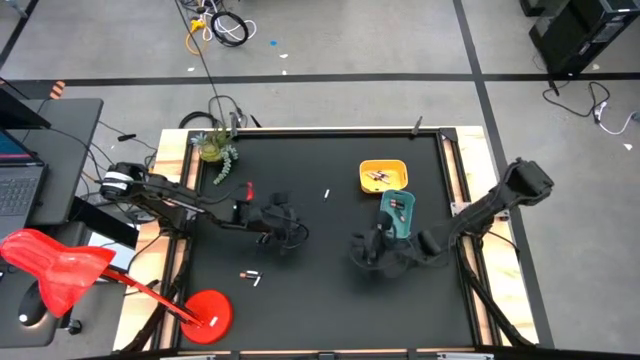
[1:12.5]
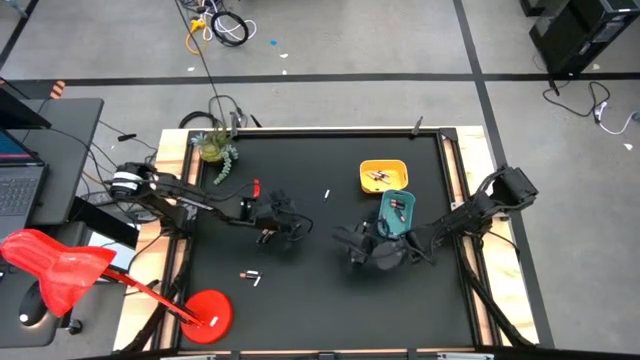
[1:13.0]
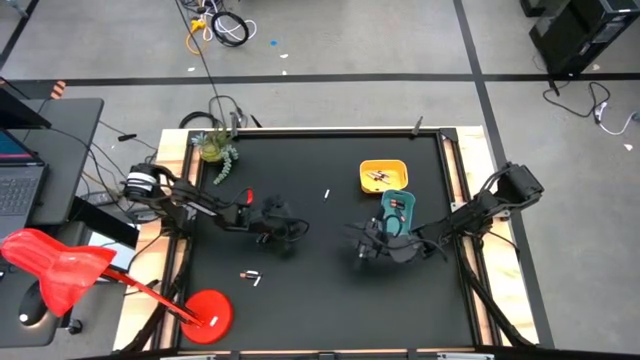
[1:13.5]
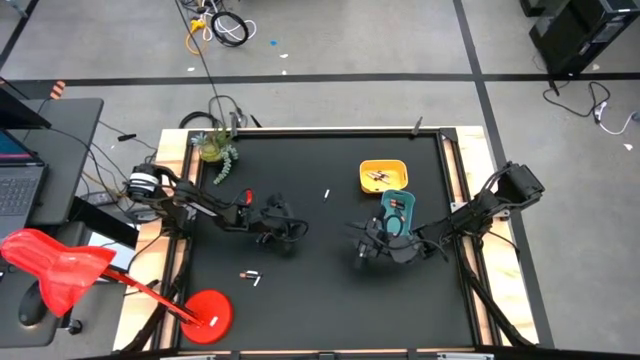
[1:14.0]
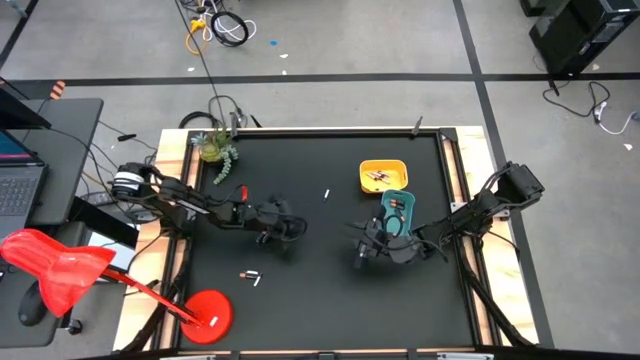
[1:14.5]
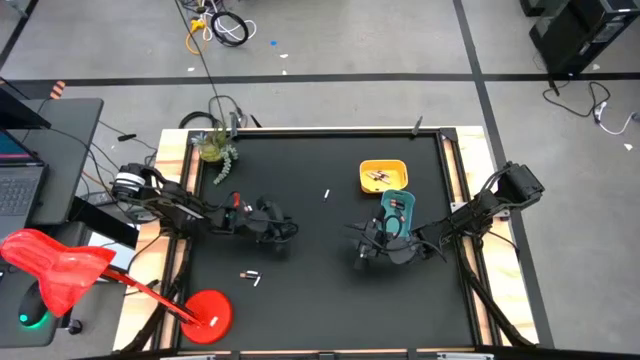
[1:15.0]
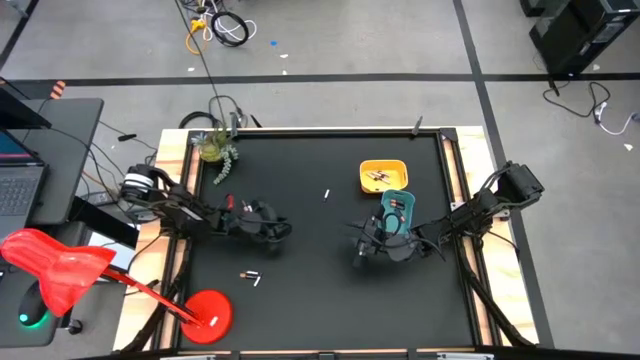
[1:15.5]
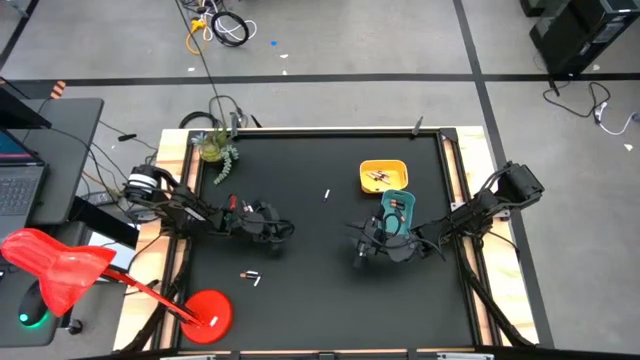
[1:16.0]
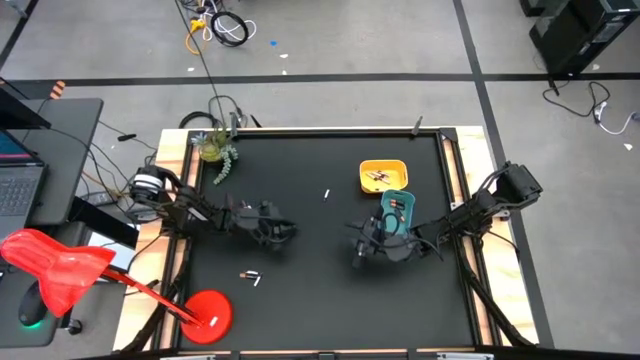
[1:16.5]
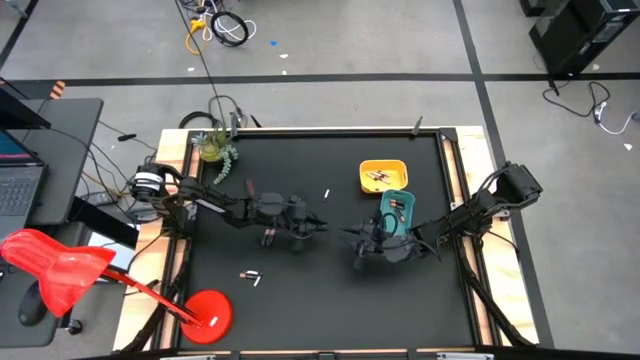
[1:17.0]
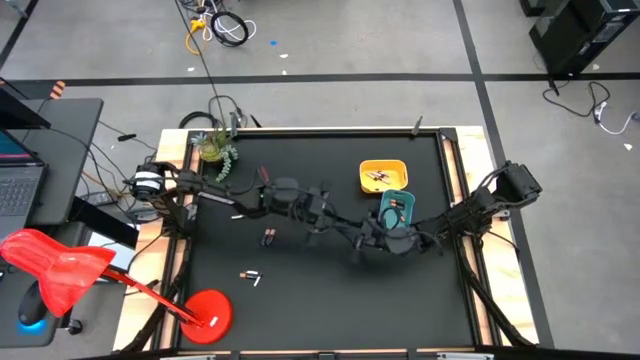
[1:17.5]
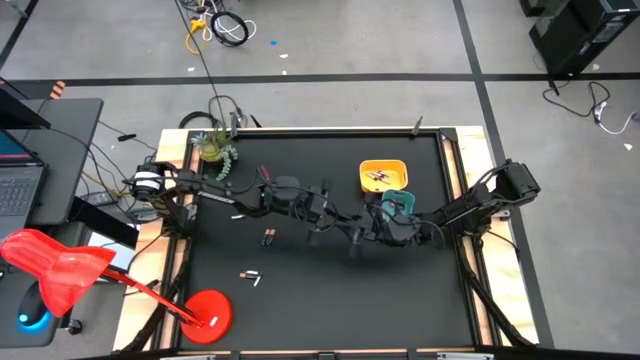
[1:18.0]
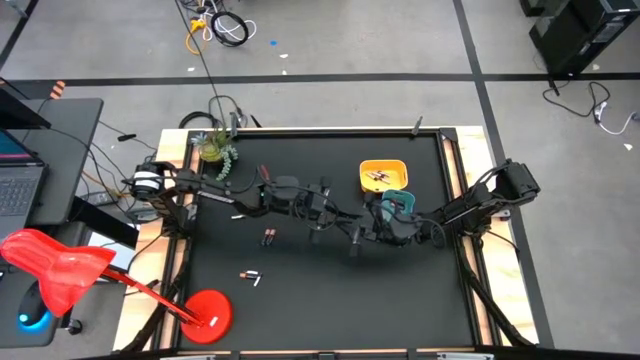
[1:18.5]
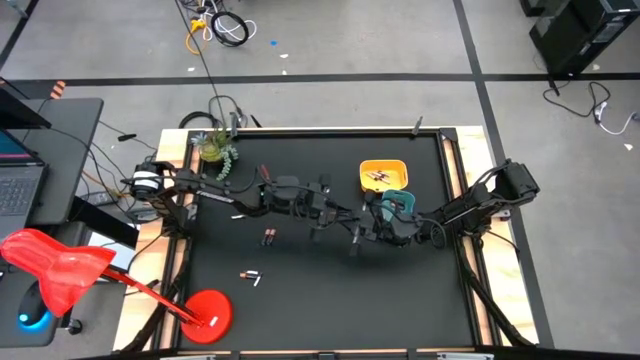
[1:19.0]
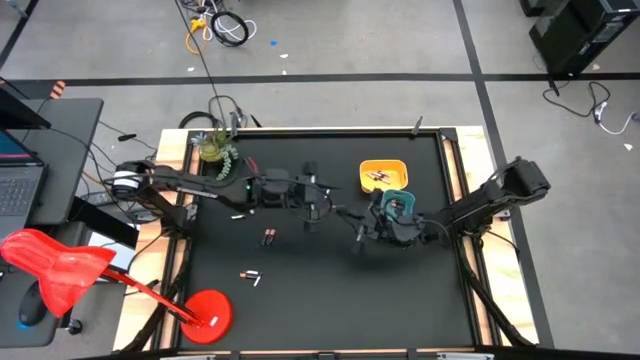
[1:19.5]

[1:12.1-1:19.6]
Task: Sort batteries
Put the gold black battery into the blue bin

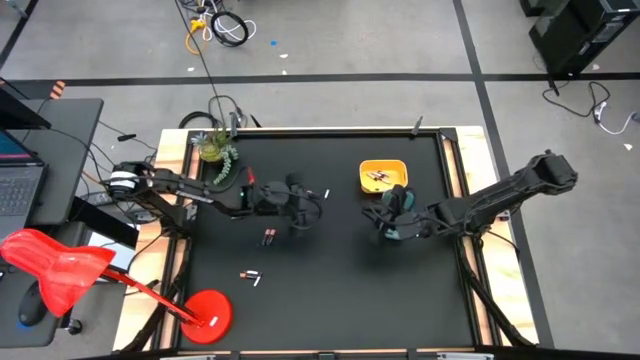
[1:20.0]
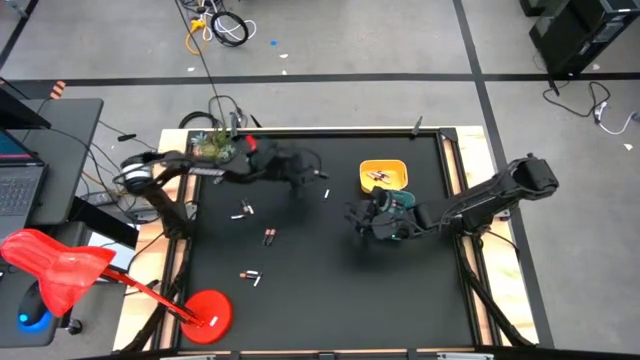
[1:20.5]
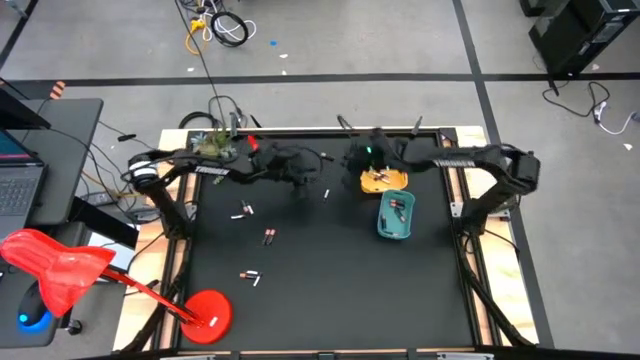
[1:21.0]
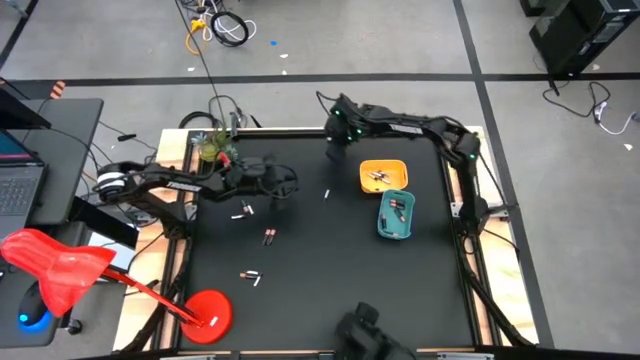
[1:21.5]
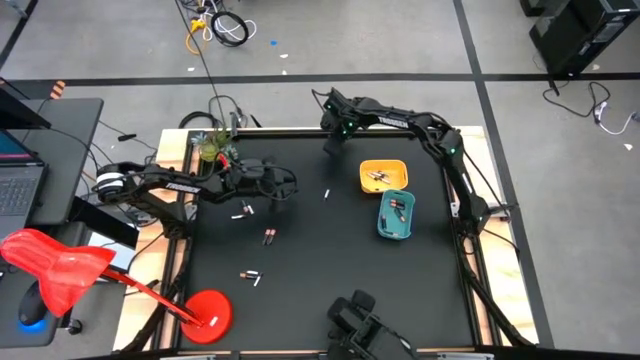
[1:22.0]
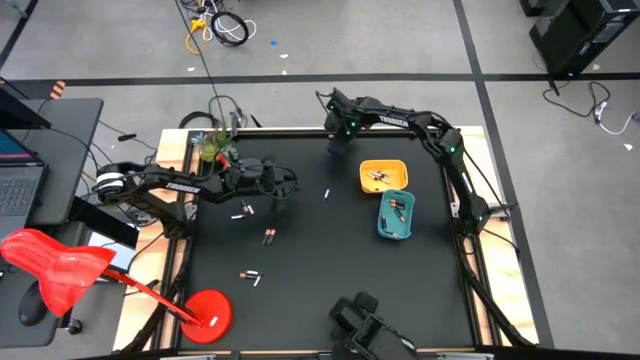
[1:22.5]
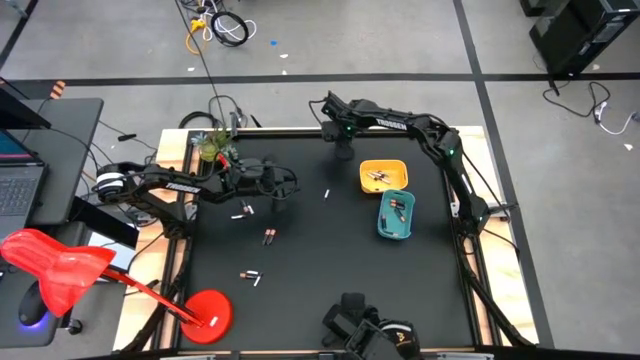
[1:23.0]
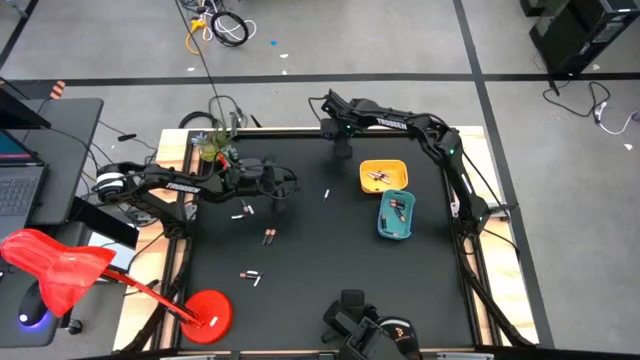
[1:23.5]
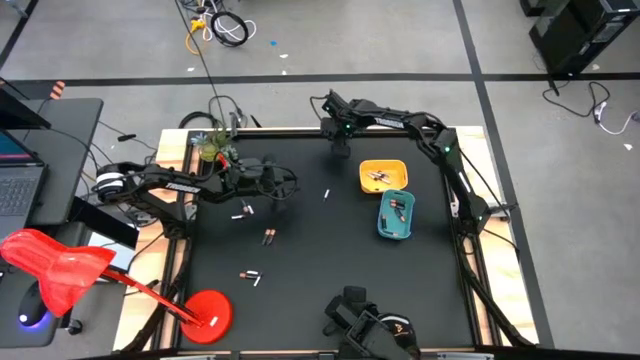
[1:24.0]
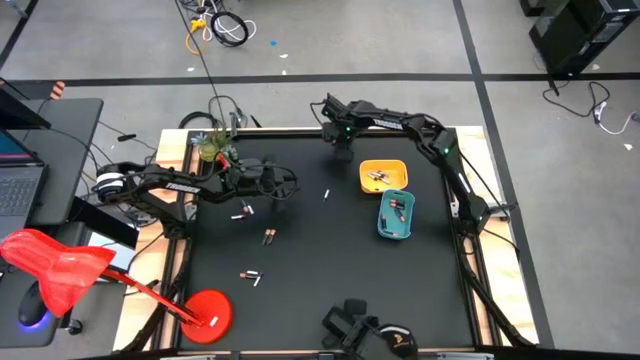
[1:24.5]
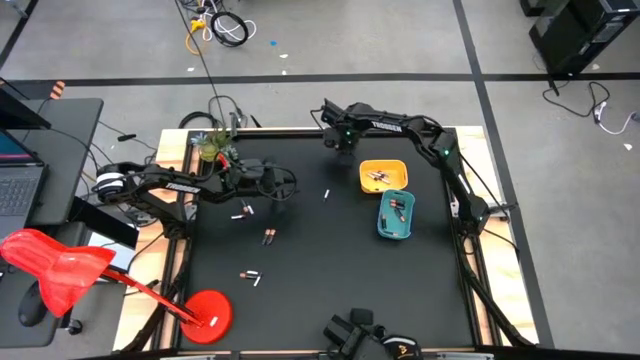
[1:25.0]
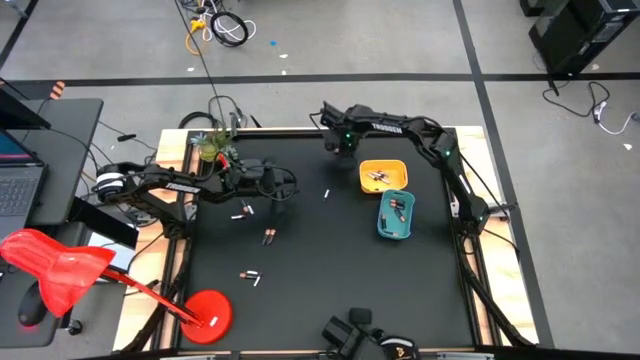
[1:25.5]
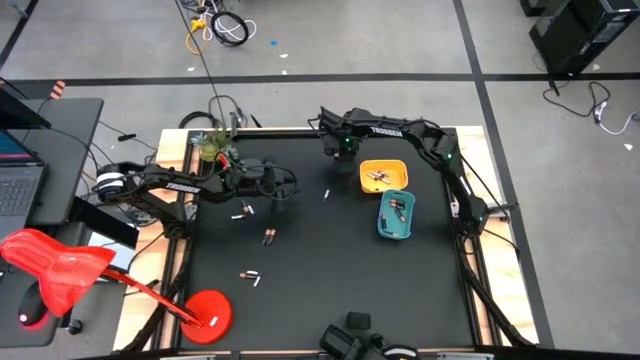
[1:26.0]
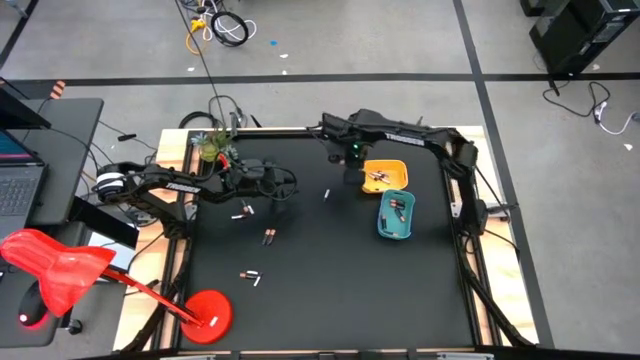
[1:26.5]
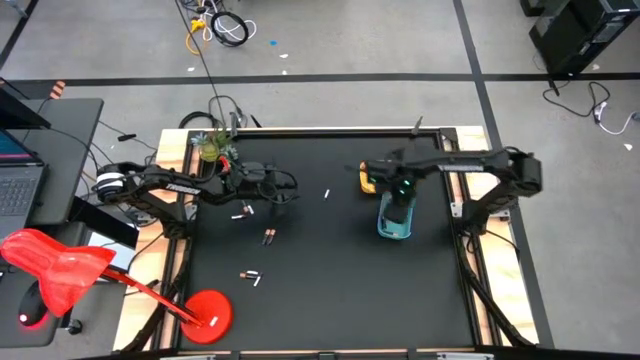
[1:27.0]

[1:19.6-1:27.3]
Put the gold black battery into the blue bin

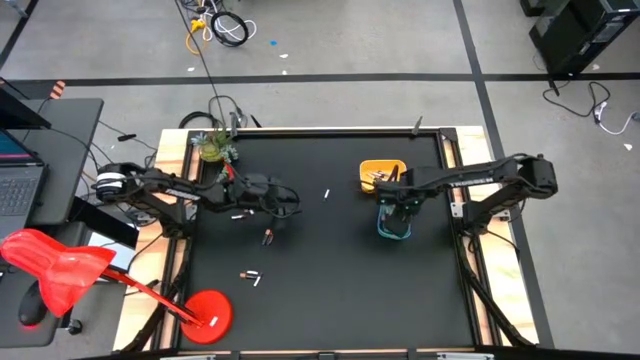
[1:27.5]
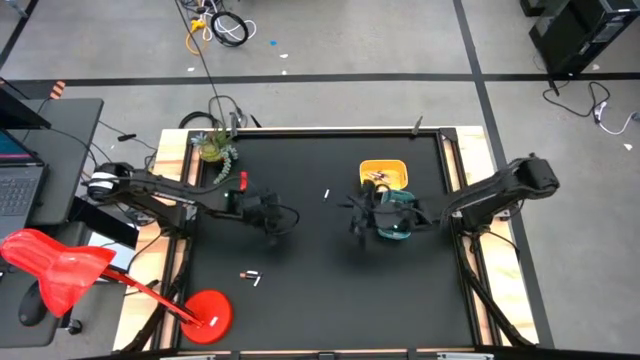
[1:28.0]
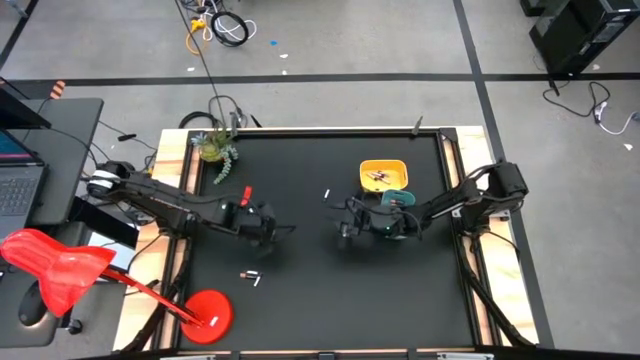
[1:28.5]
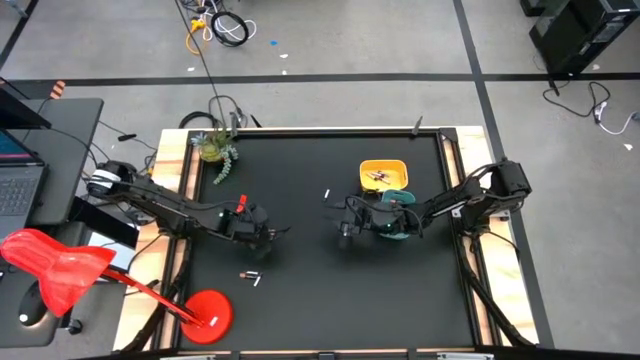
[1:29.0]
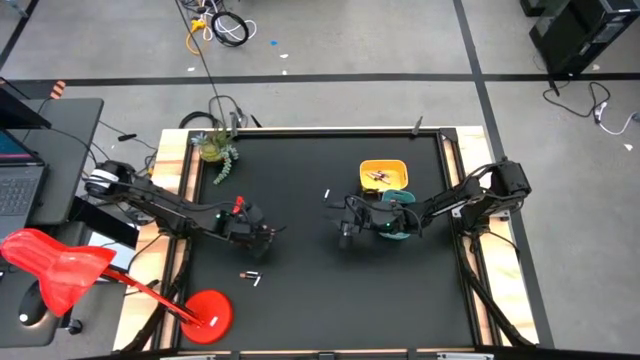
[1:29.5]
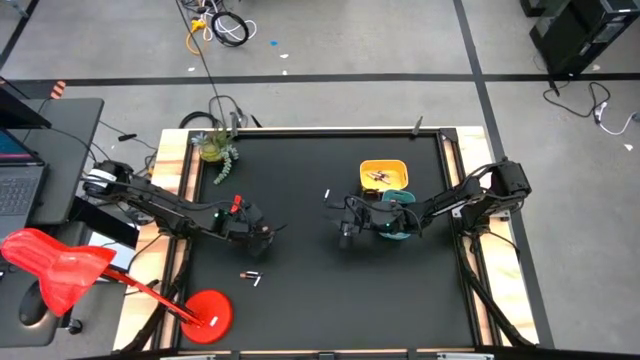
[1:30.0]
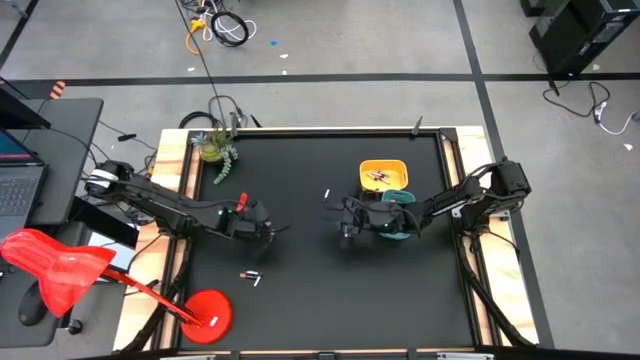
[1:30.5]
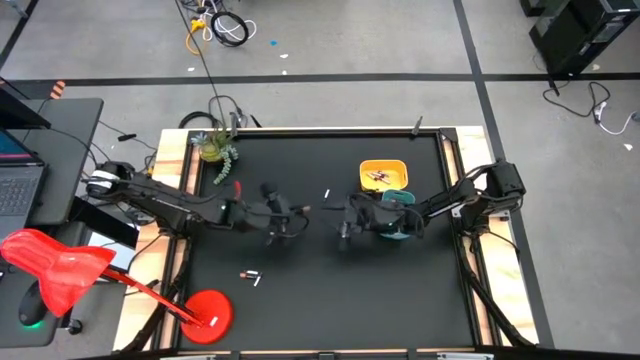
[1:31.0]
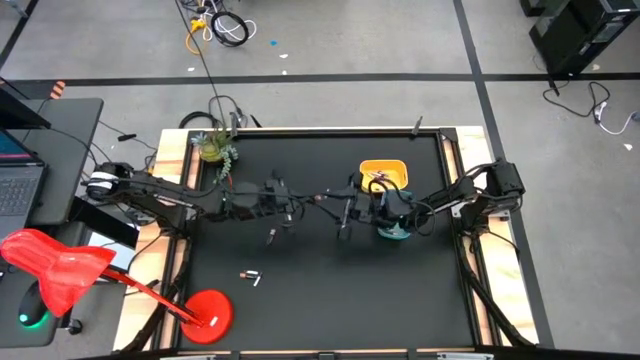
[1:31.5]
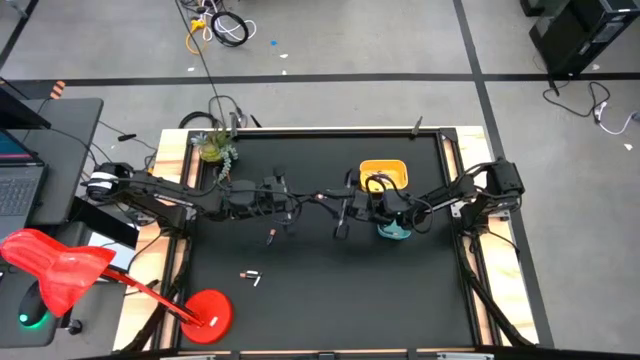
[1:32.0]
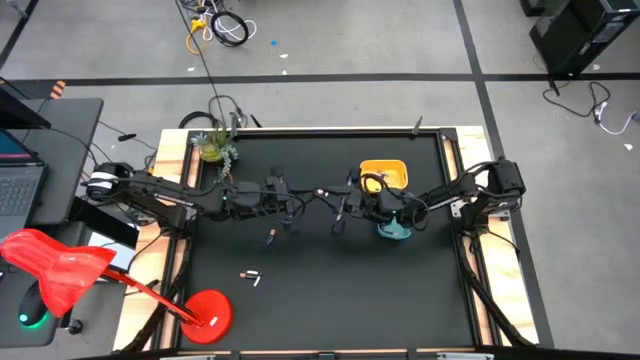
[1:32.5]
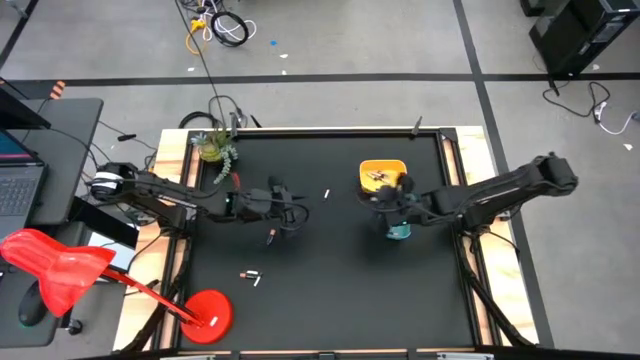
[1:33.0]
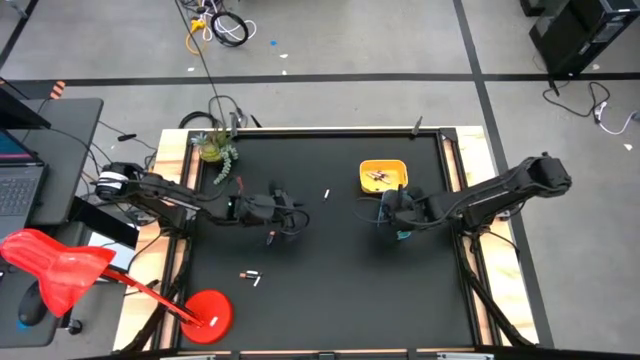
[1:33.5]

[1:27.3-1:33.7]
Put the gold black battery into the blue bin
